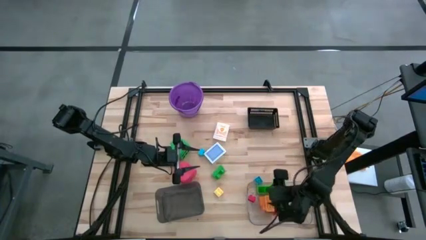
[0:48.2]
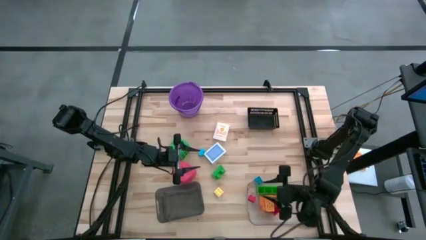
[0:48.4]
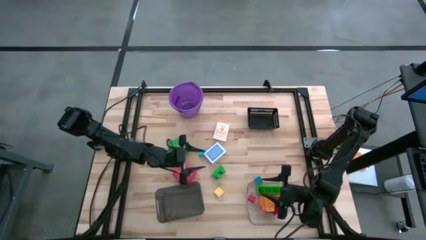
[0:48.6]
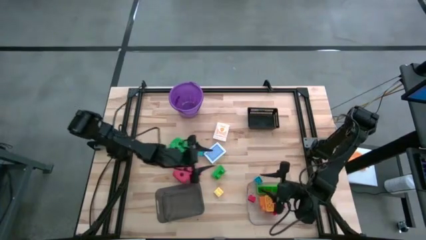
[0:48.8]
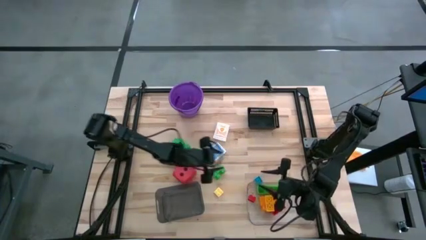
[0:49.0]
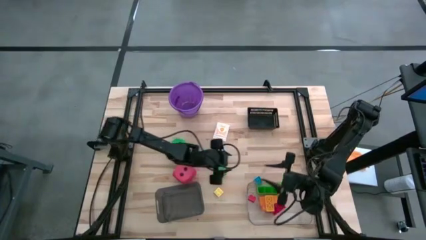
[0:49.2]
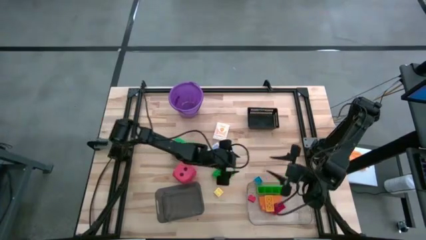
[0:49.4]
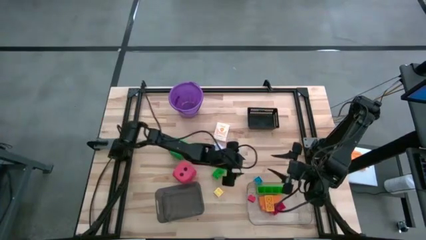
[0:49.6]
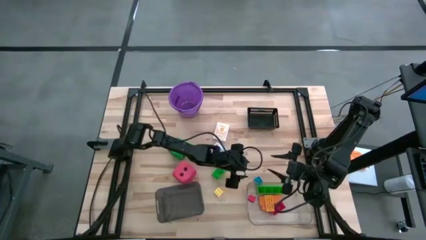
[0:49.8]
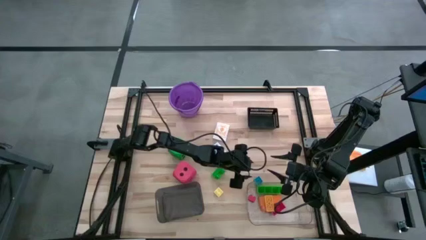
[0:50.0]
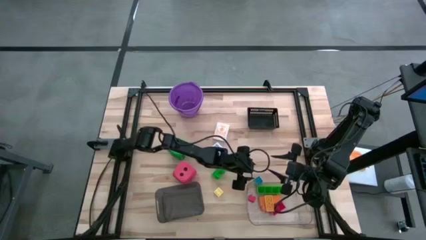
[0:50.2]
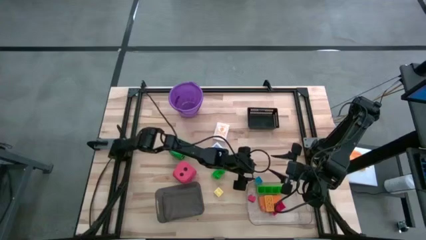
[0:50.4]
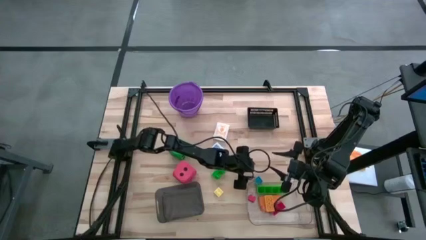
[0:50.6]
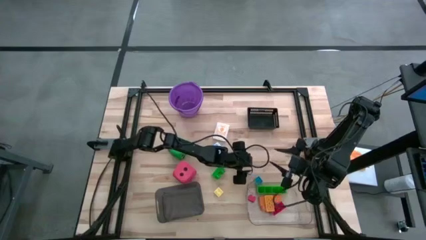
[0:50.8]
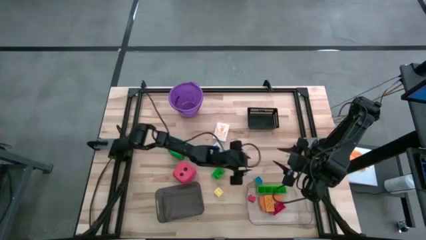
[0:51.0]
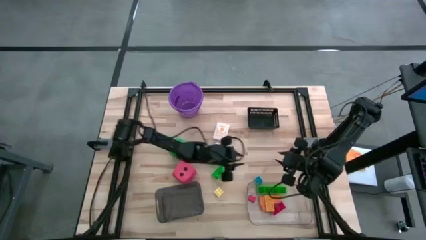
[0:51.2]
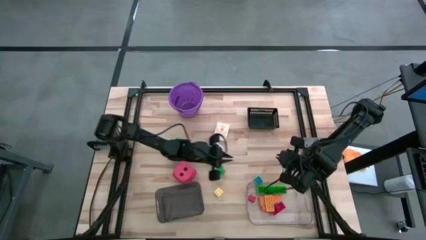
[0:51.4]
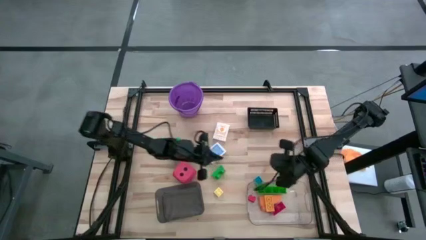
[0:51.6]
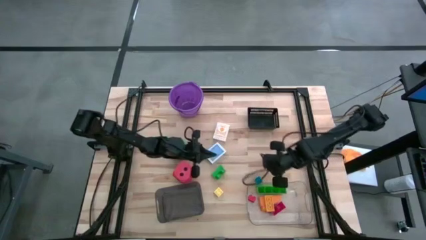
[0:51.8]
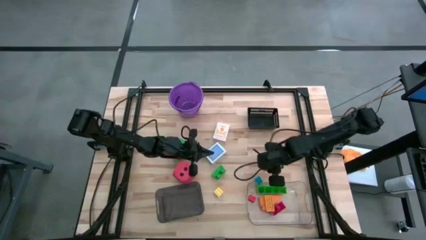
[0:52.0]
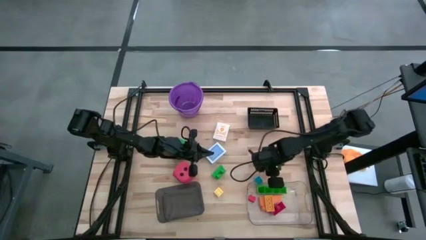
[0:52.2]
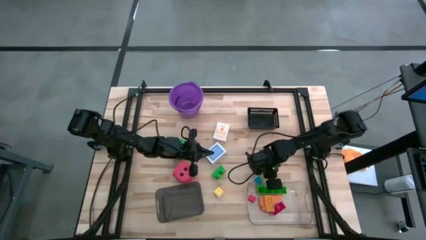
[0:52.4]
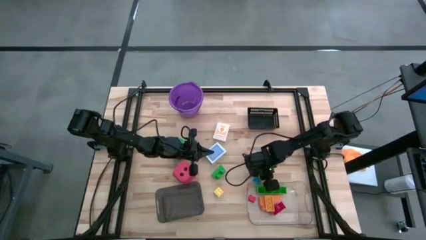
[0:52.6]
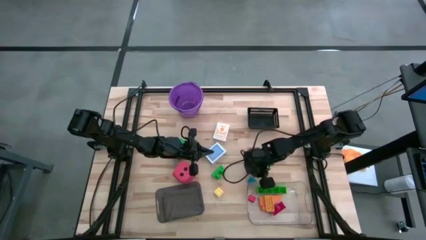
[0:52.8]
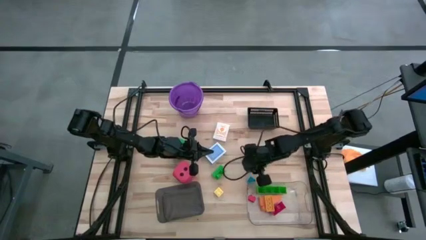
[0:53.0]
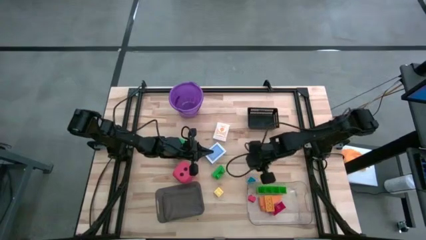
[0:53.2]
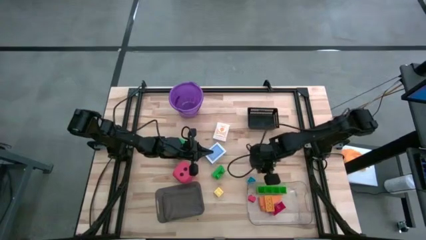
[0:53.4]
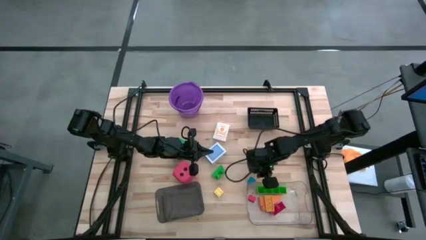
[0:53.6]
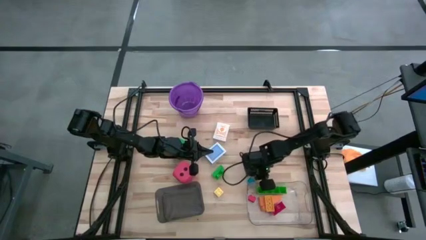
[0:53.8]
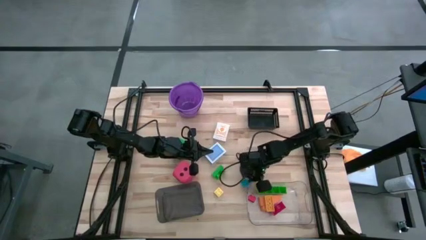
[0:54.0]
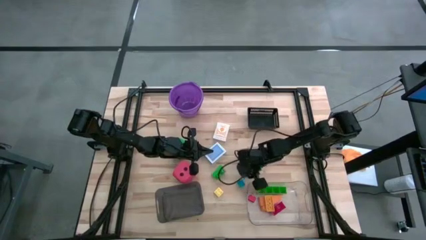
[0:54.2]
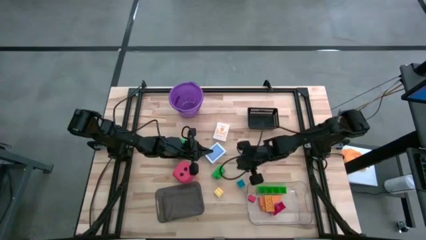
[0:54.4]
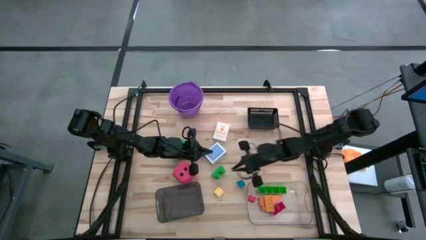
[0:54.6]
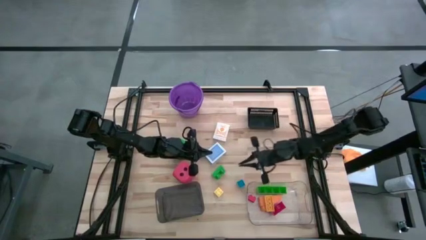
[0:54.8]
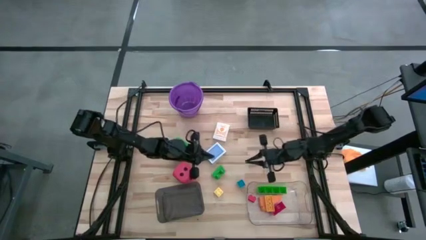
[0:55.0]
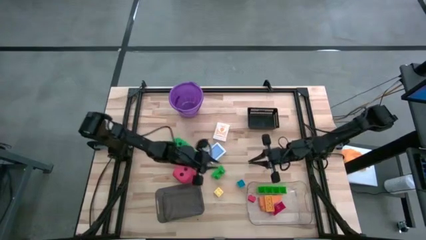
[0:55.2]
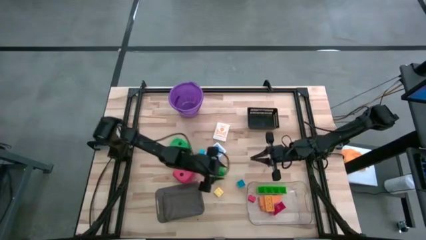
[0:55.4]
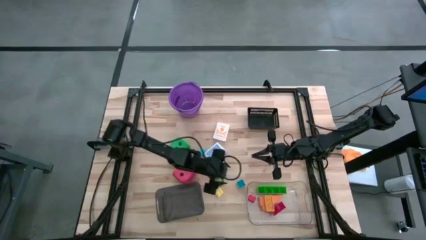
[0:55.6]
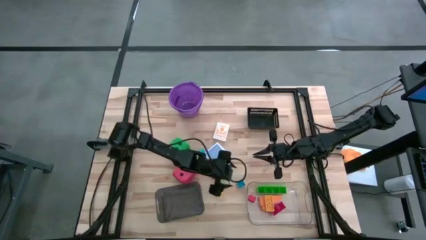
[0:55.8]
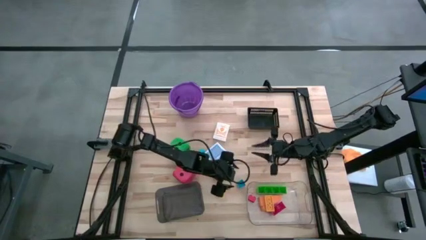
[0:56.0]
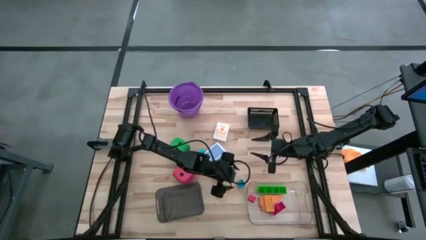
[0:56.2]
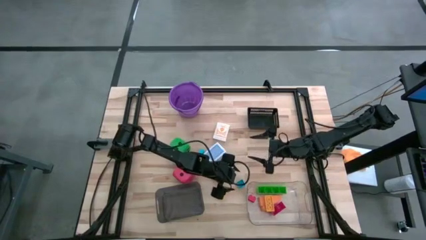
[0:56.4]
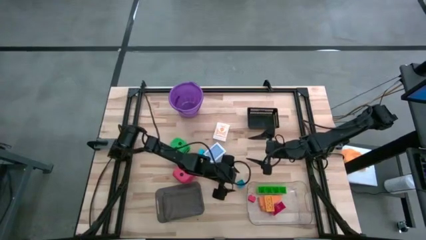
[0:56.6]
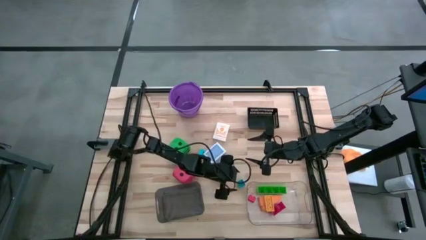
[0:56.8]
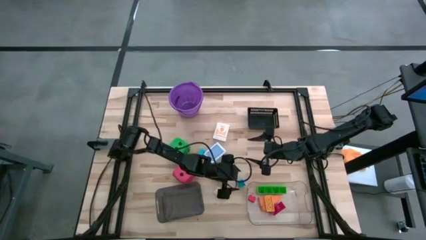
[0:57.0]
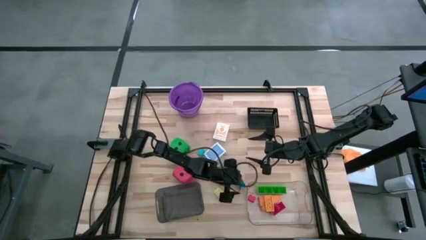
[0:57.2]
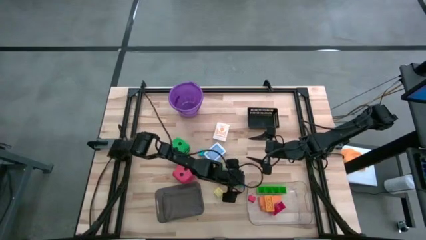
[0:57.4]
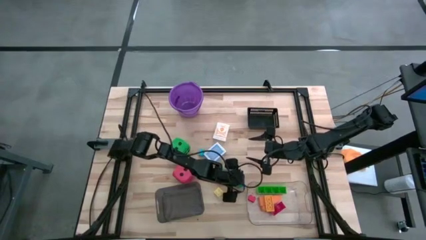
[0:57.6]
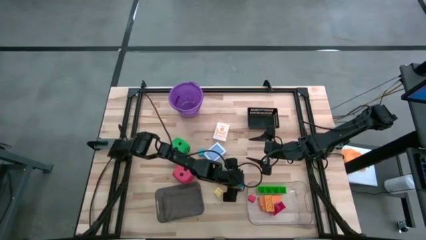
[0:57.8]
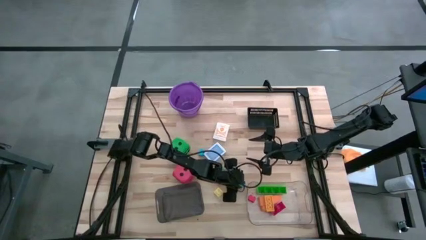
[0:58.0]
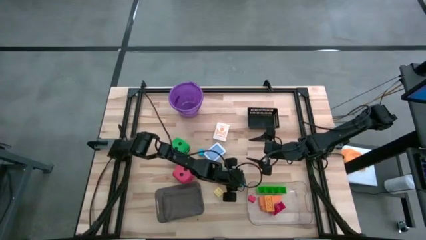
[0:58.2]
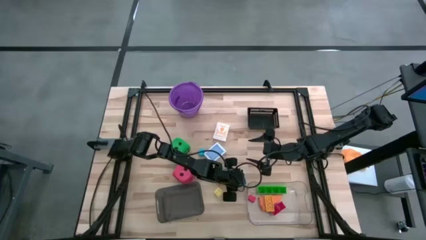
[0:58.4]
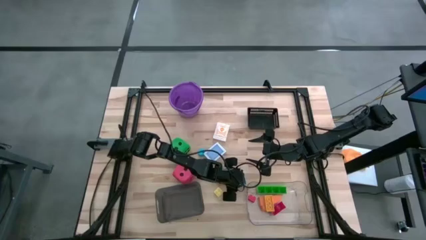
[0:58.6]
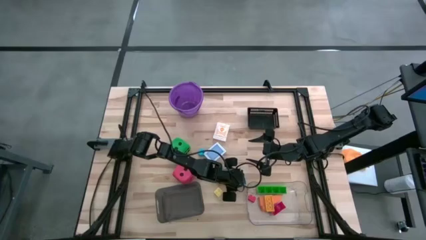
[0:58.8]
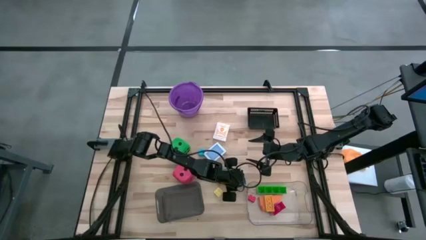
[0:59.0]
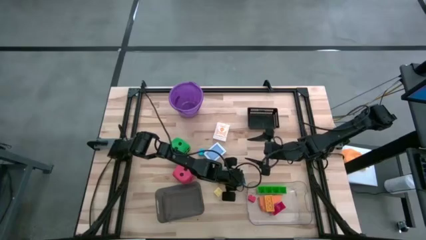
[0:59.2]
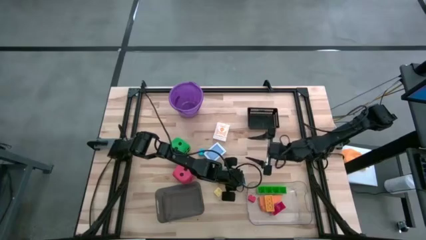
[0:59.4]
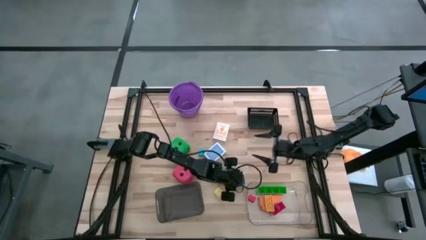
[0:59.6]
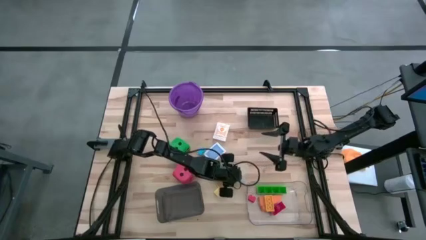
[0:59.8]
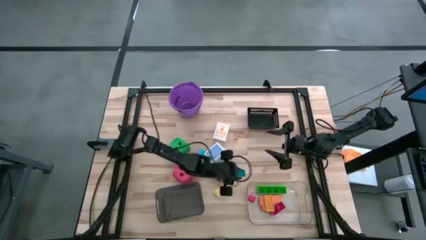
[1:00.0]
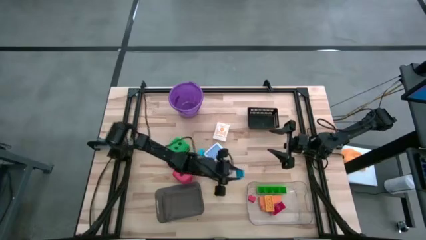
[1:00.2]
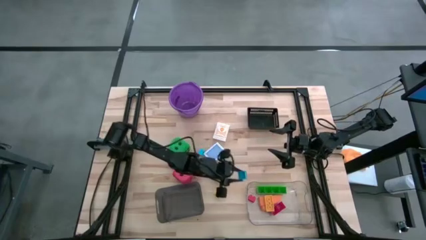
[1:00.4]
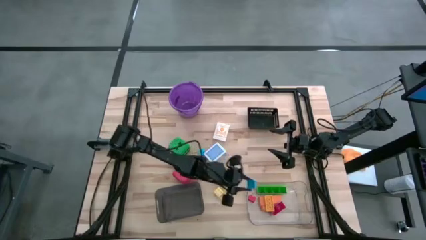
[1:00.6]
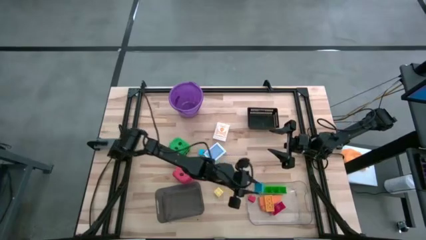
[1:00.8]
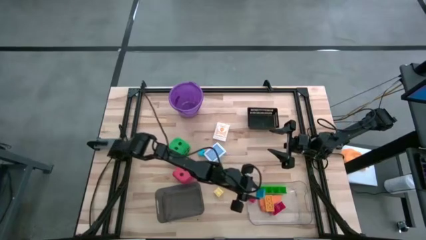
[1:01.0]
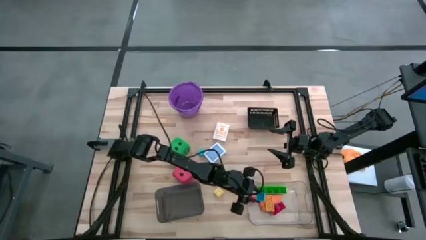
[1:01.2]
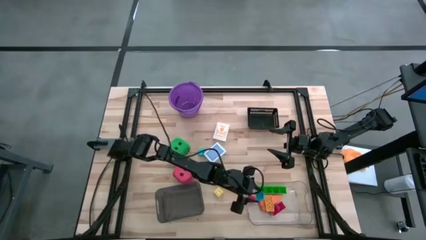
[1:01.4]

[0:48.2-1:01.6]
Task: Pick & Place Toys
Put the right small blue game piece into the transparent bin

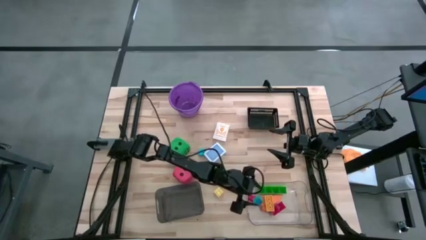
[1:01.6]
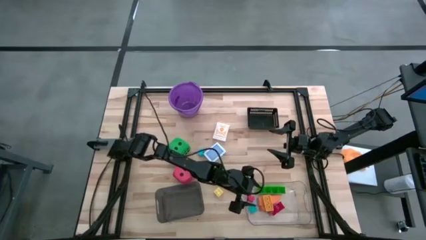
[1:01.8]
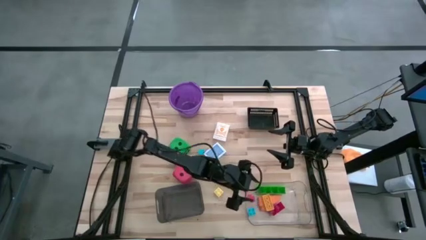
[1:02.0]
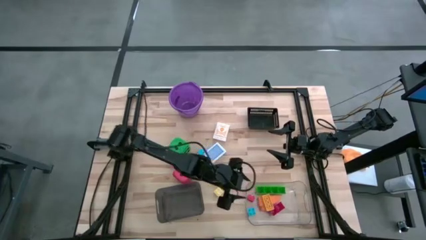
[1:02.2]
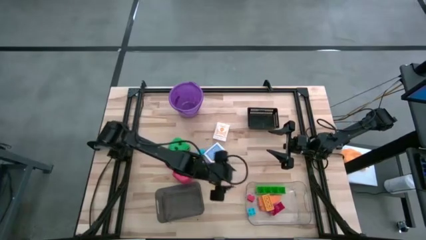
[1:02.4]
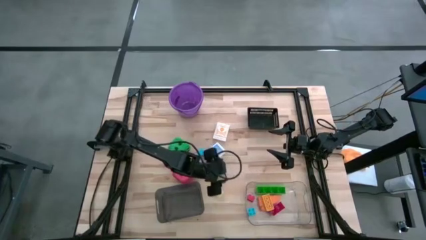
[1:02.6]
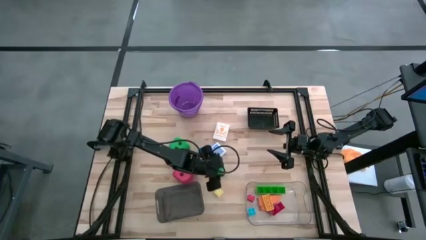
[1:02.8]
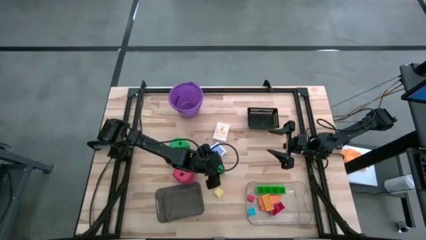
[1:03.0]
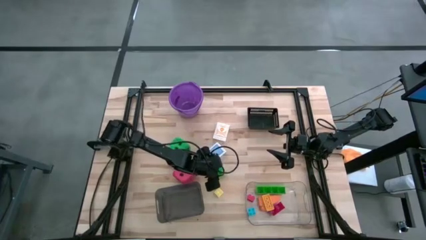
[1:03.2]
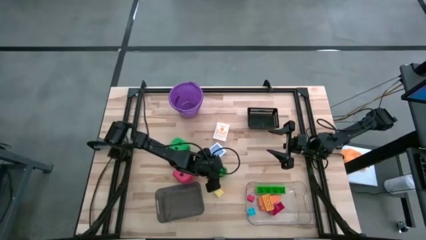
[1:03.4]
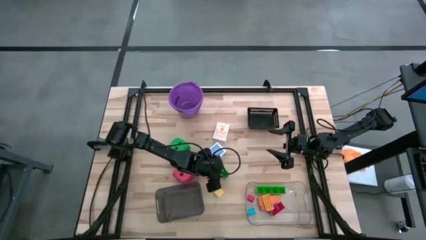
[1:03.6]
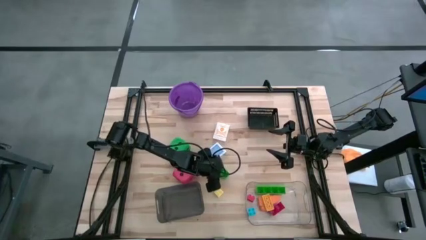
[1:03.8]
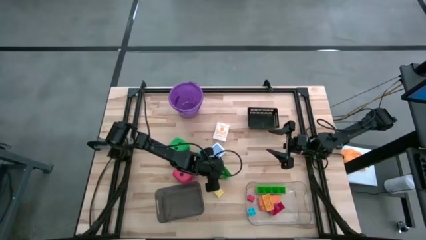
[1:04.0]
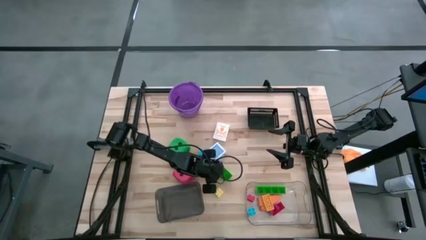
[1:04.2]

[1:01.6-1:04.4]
Put the large green game piece into the transparent bin

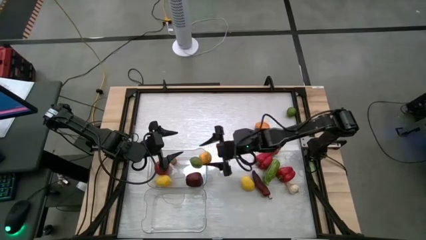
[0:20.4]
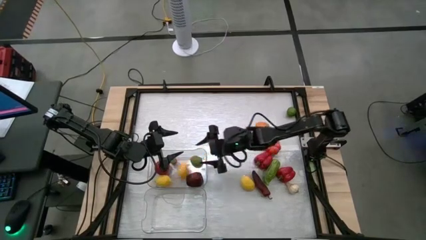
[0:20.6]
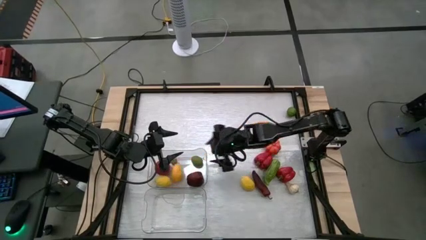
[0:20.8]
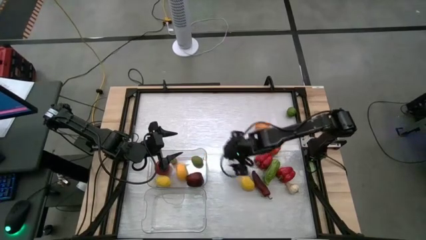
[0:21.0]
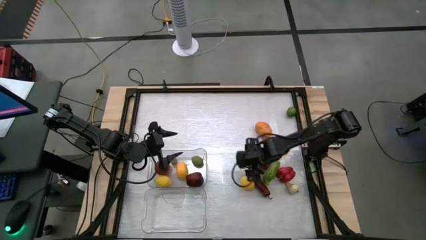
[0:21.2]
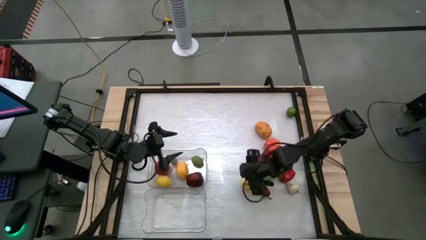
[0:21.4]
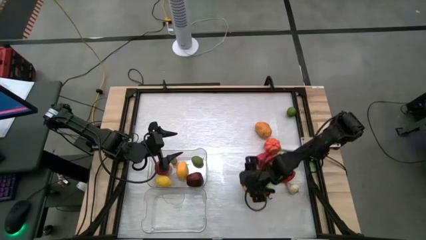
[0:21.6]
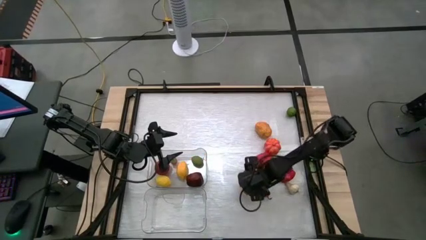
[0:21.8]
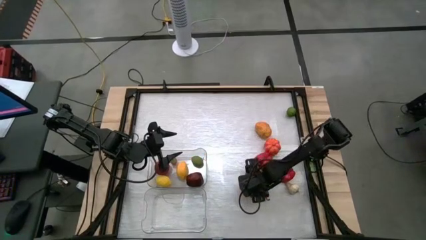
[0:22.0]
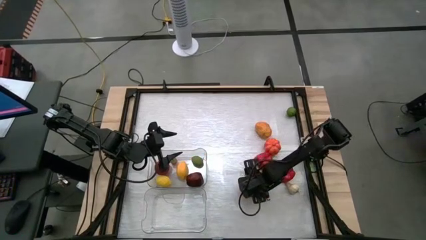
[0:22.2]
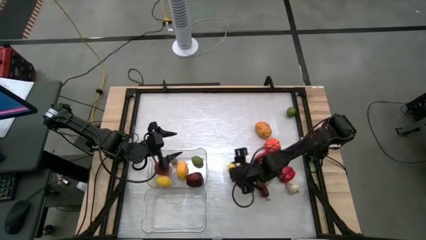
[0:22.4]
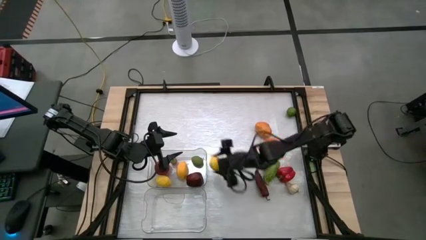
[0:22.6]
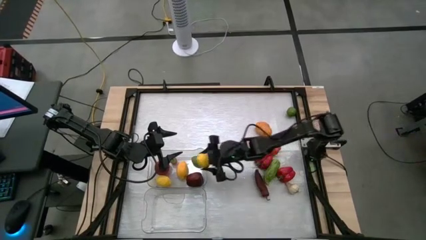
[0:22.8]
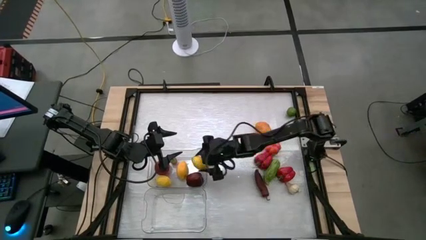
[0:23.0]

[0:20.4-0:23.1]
Task: Sort produce into baskets
Put the yellow lemon into the top transparent bin
